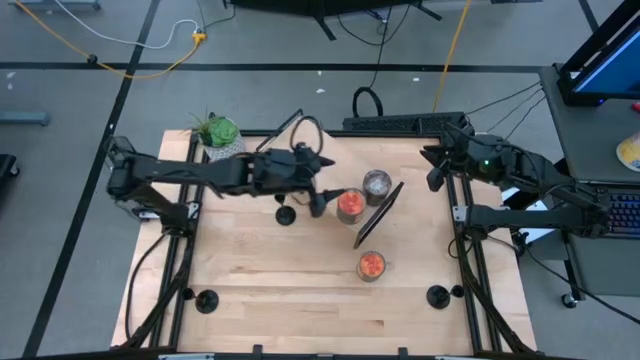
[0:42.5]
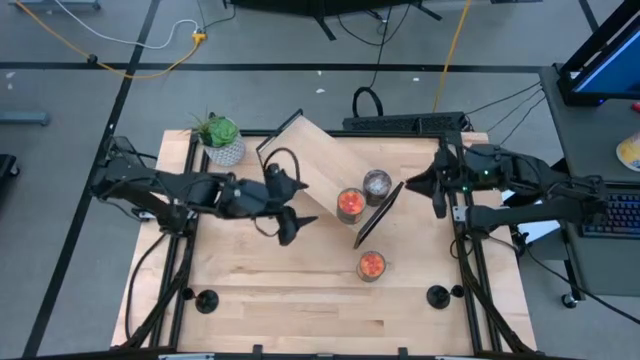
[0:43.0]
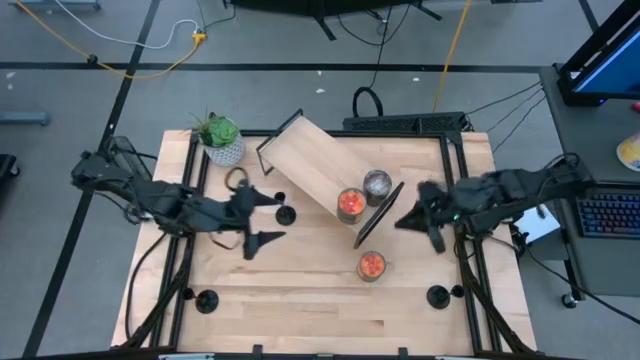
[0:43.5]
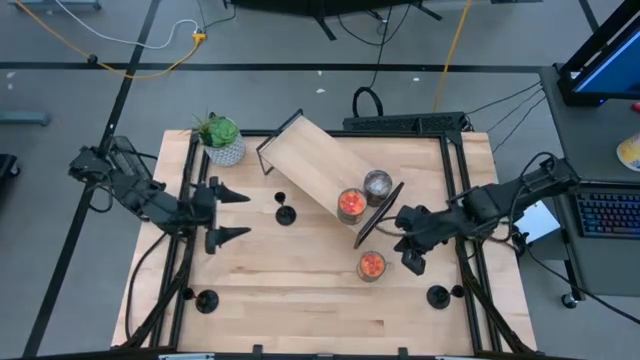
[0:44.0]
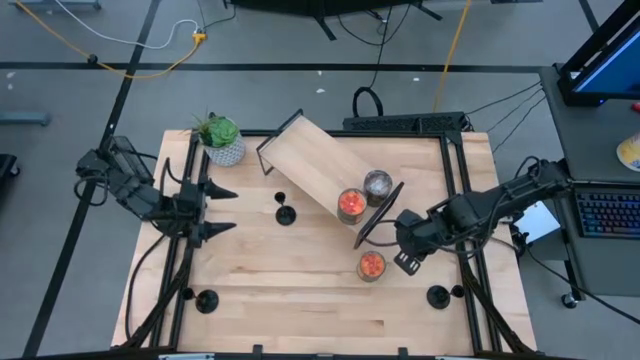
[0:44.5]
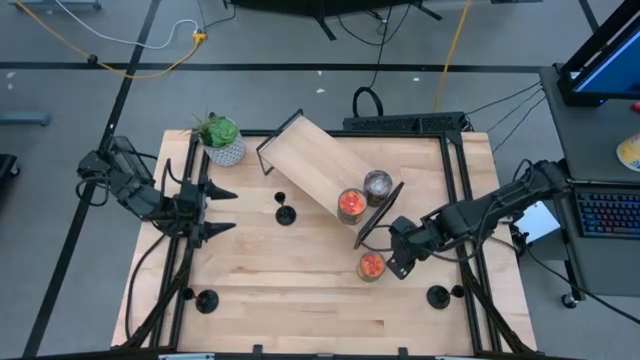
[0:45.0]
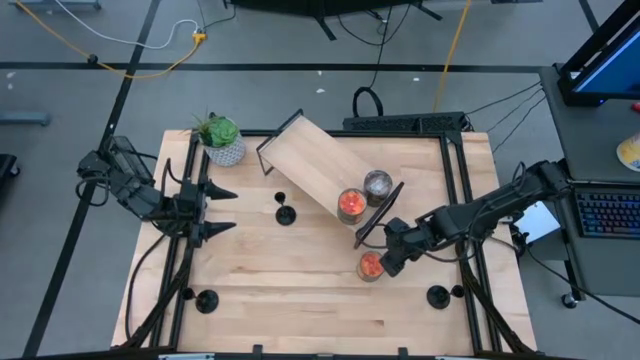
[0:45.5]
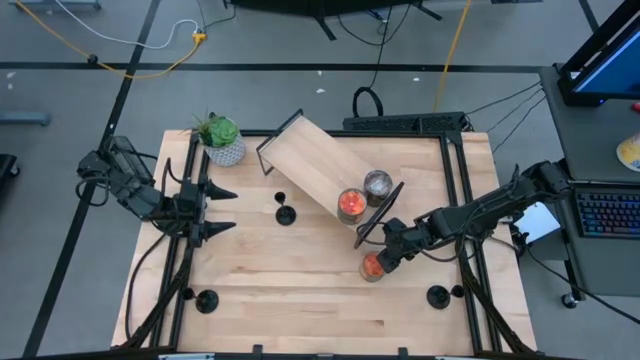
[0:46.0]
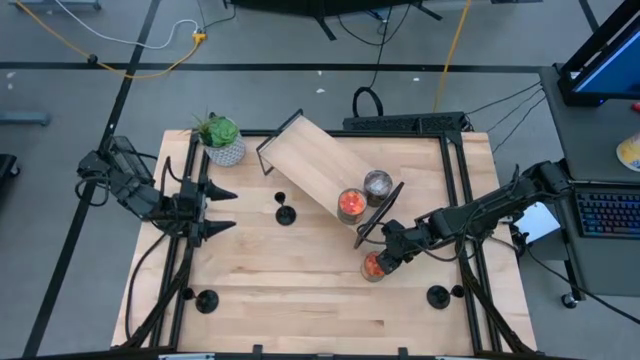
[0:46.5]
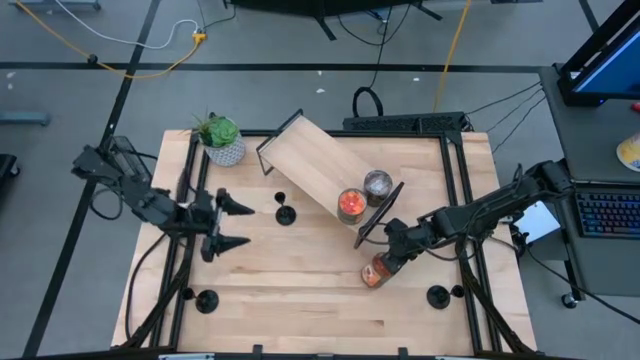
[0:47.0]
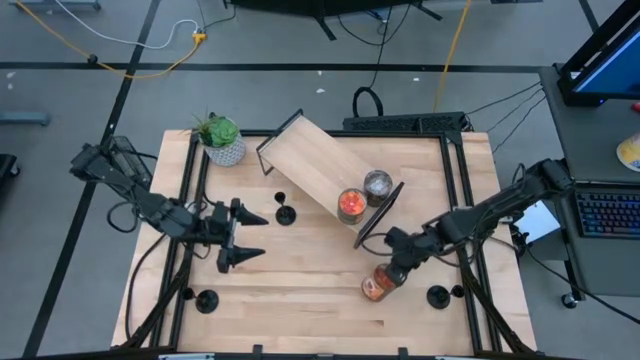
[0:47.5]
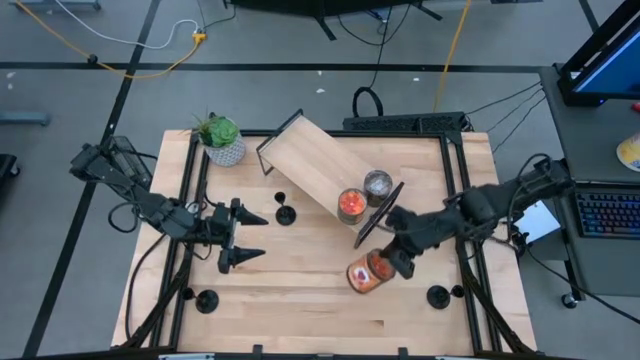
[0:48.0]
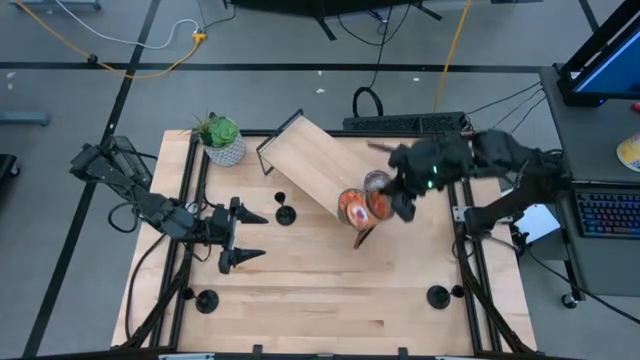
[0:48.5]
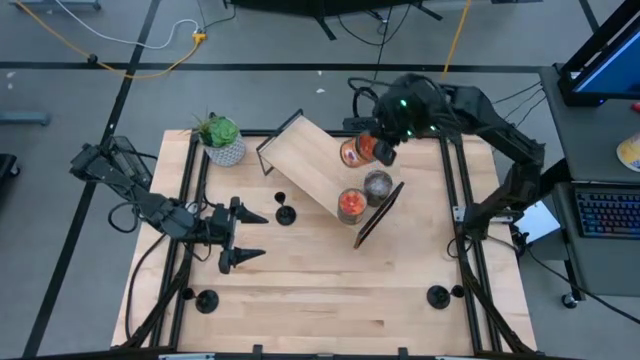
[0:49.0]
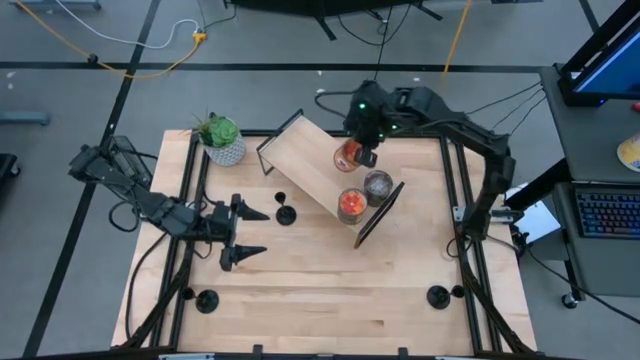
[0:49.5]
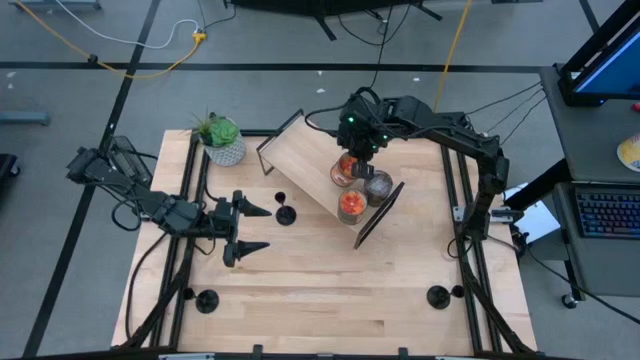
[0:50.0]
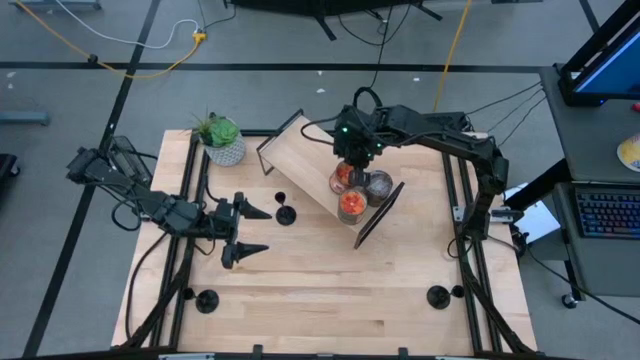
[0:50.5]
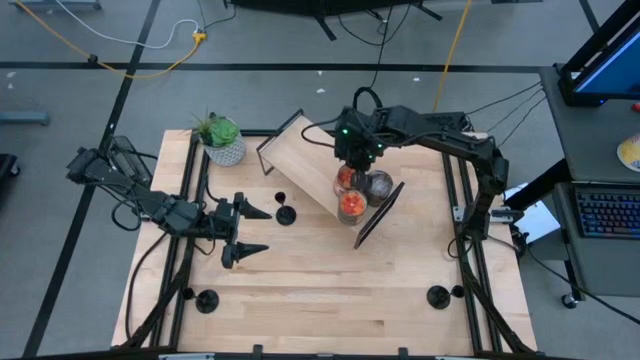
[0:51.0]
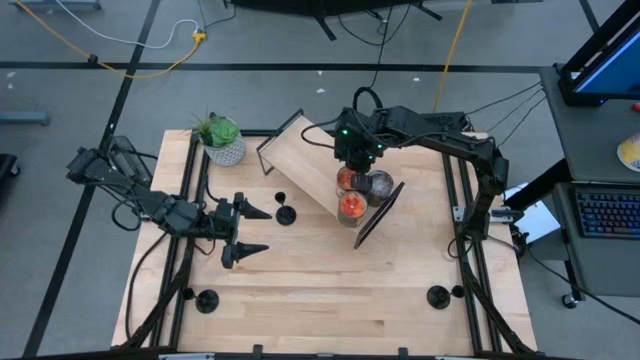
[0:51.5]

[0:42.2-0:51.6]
Task: Pick & Place candle stick holders
Put the orange scented candle on the shelf

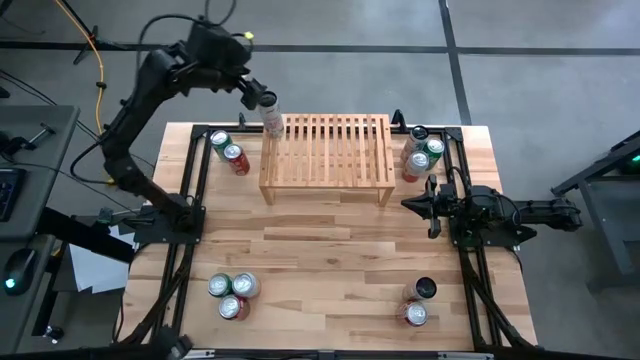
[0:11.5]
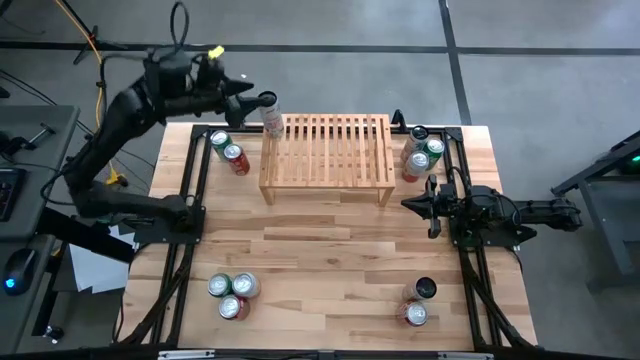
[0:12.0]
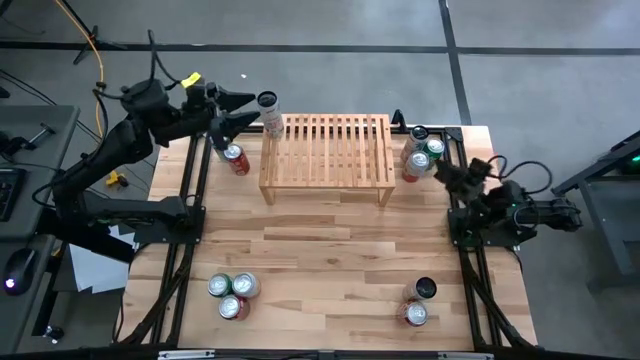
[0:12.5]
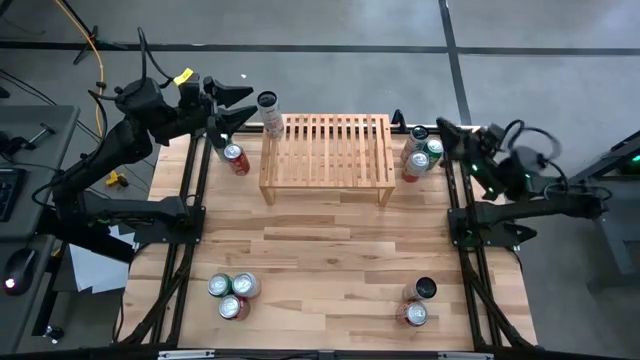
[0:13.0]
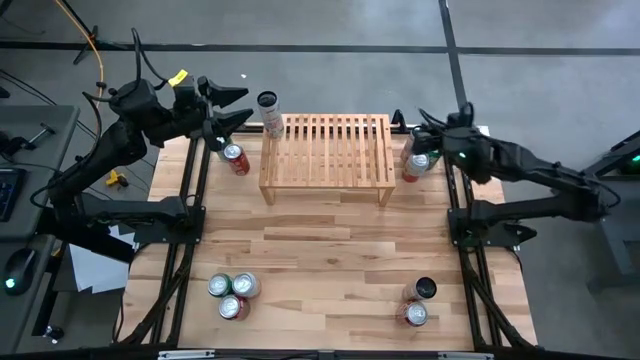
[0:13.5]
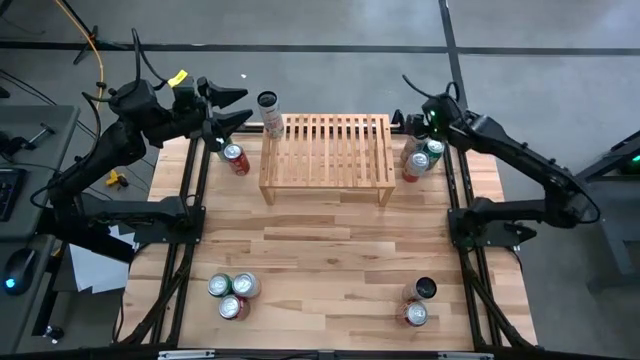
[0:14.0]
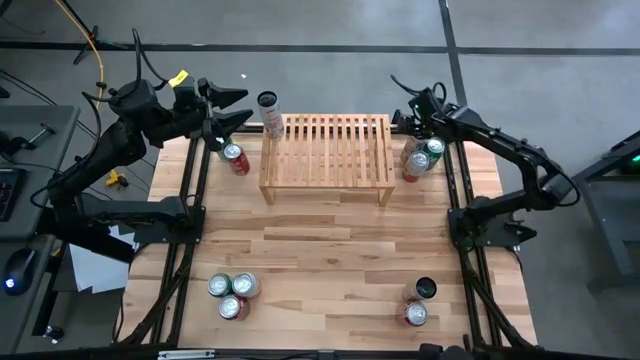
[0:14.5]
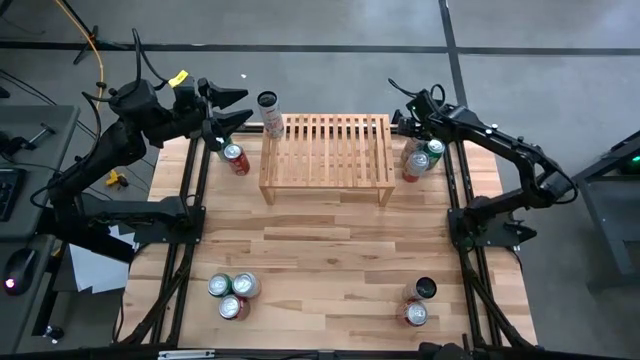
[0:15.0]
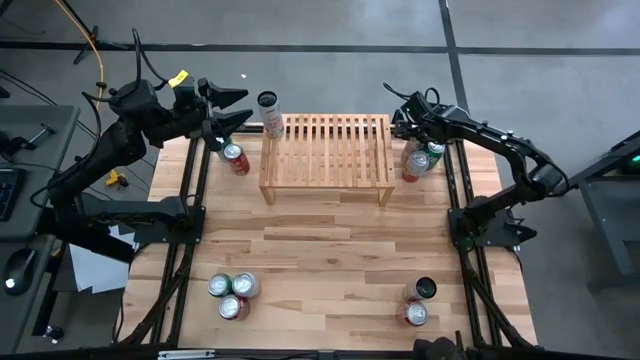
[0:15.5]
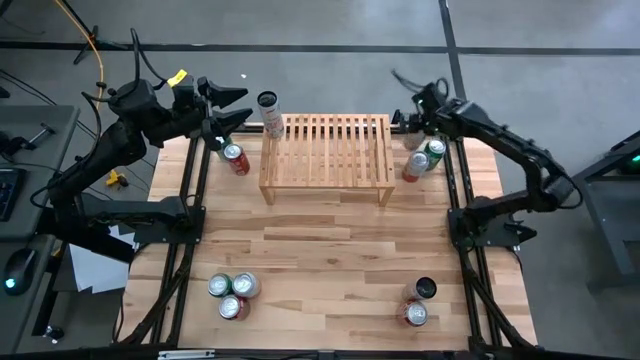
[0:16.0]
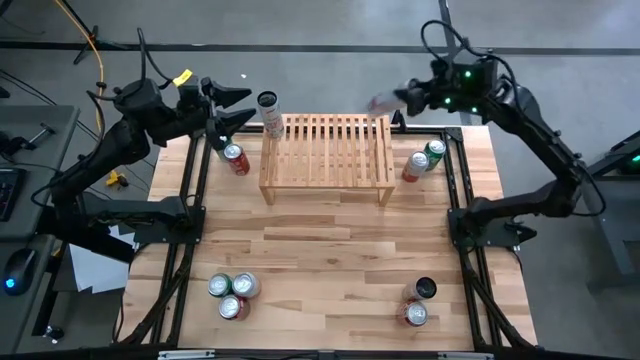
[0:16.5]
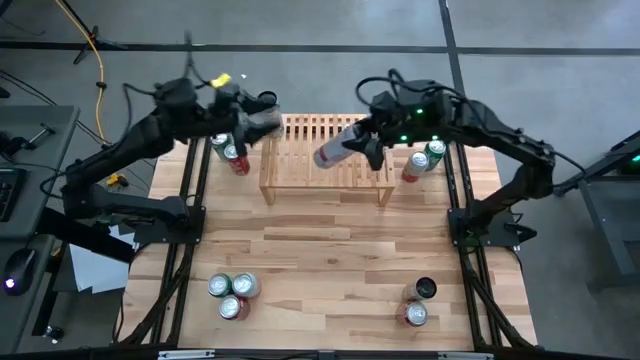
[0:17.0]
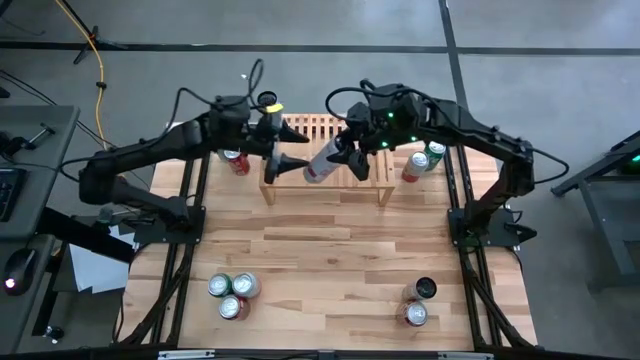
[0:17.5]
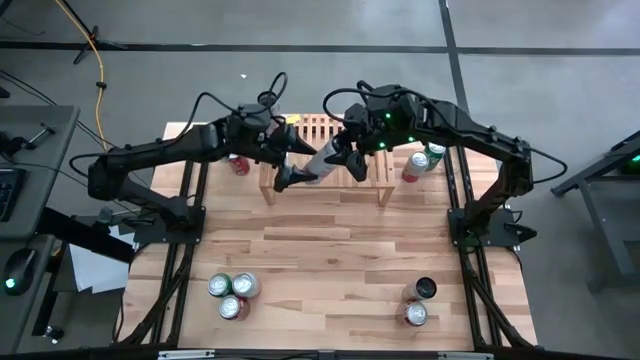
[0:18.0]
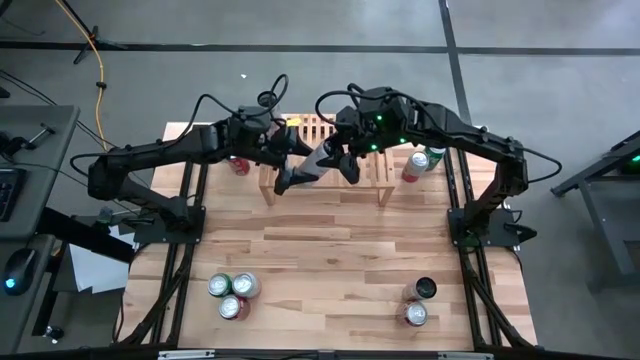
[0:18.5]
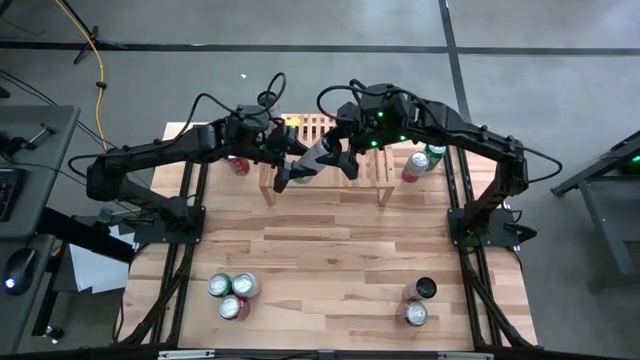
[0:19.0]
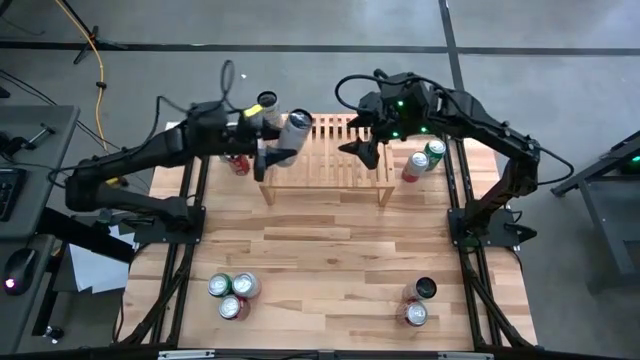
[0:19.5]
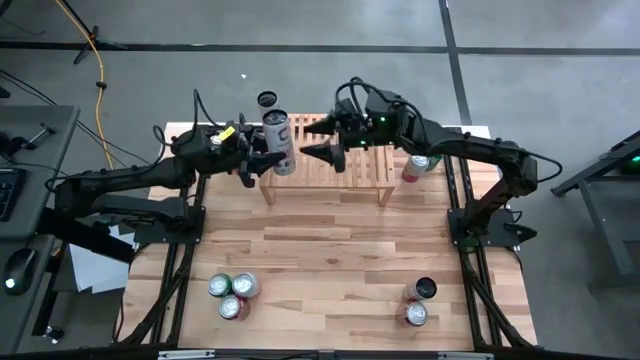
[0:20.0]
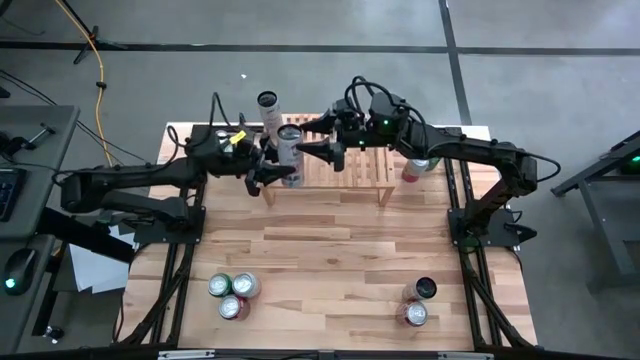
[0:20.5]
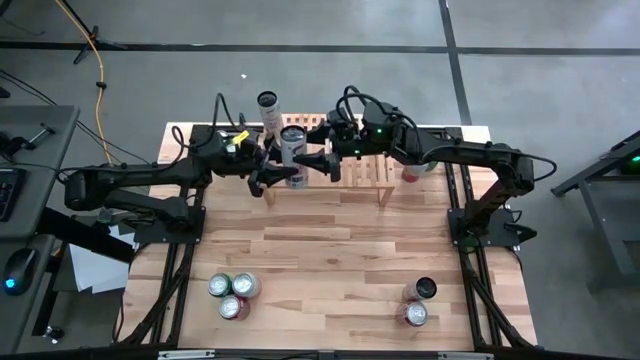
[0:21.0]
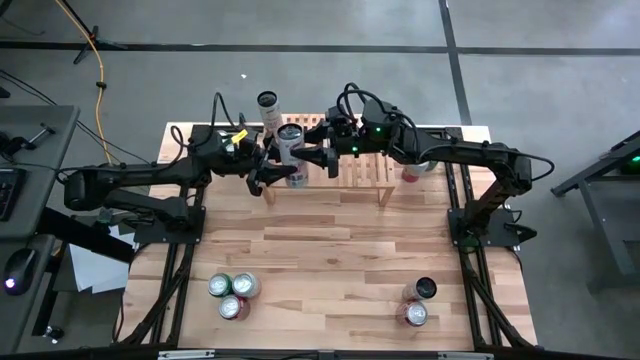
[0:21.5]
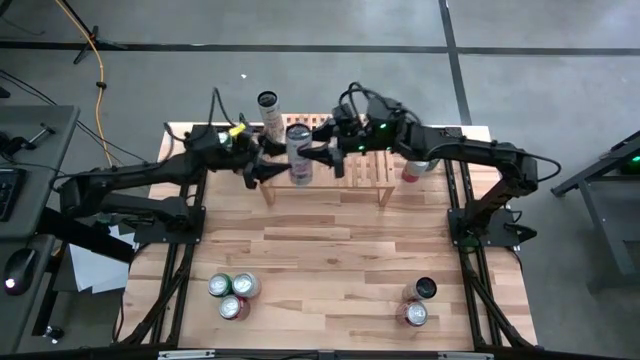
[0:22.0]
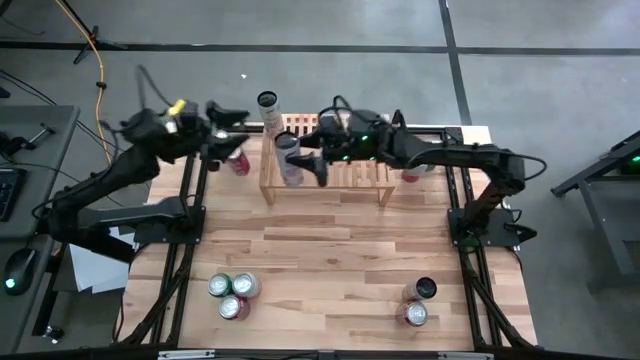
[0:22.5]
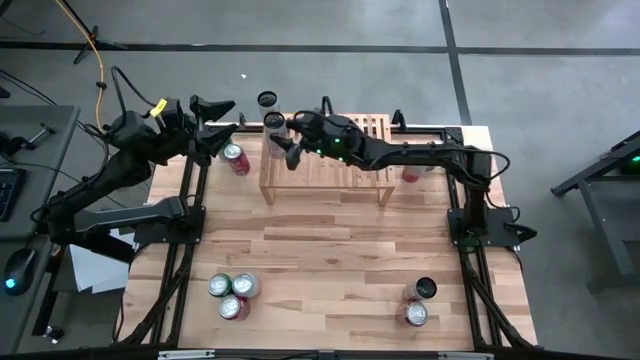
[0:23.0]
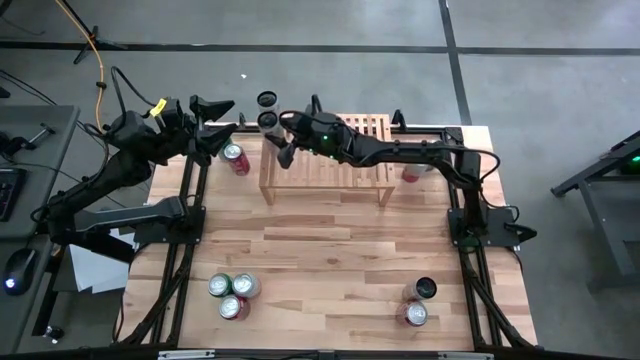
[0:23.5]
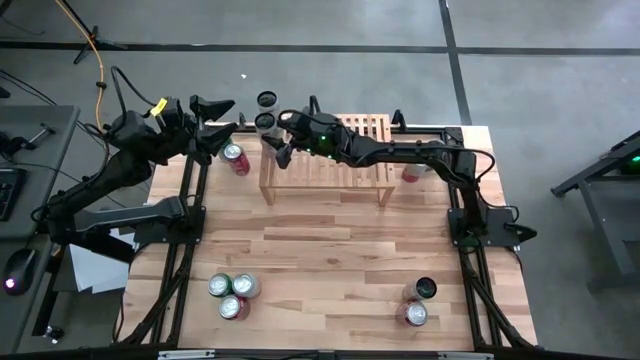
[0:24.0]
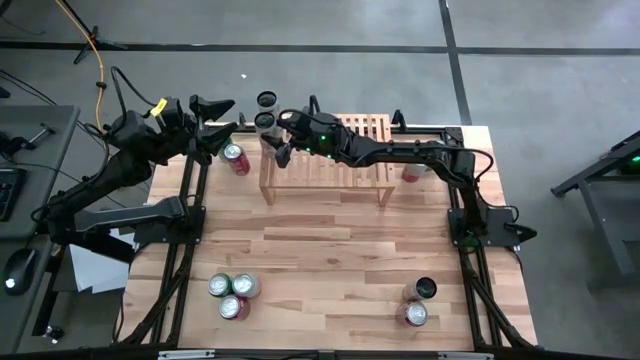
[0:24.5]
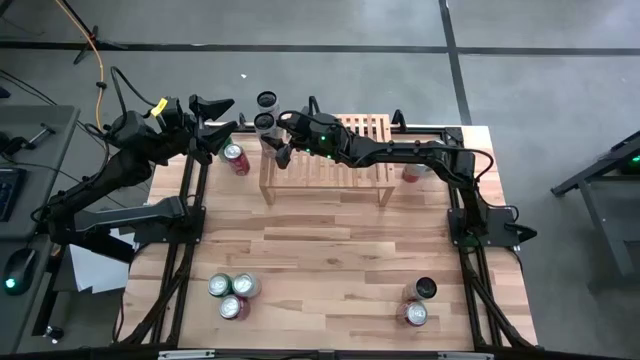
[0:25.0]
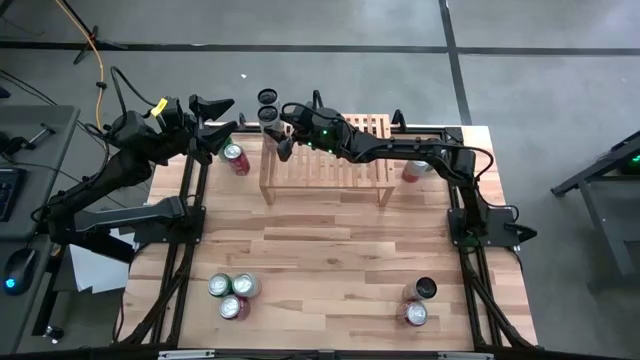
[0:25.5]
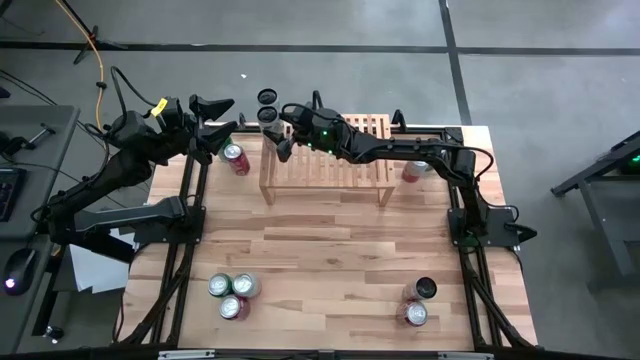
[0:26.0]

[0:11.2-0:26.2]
Task: Place canned beverage on shelf
Put the top white-pink soda can on the shelf aligned with the other white-pink soda can
